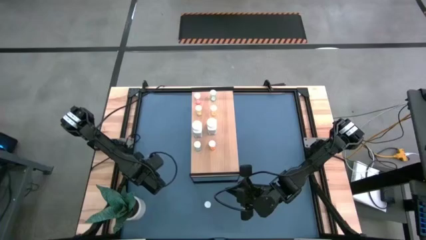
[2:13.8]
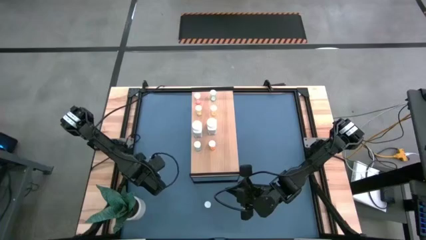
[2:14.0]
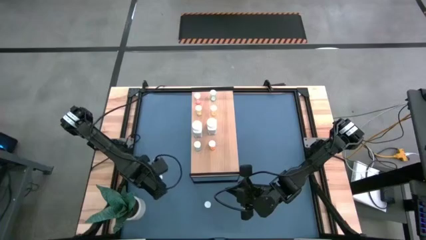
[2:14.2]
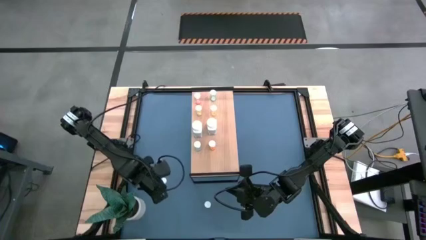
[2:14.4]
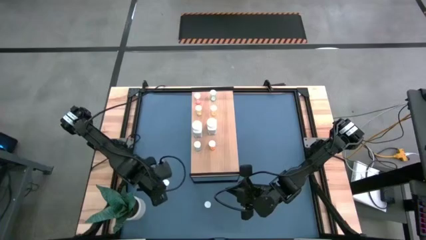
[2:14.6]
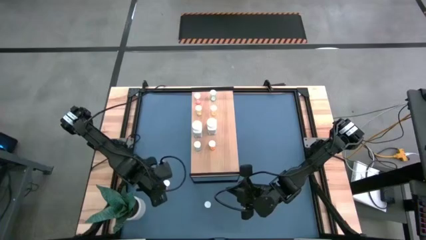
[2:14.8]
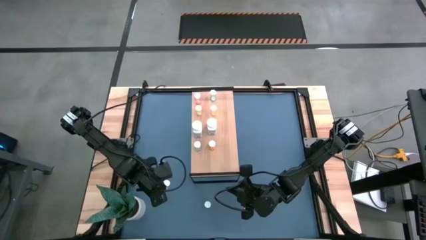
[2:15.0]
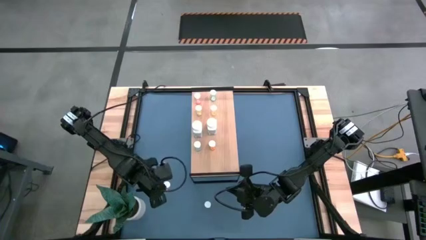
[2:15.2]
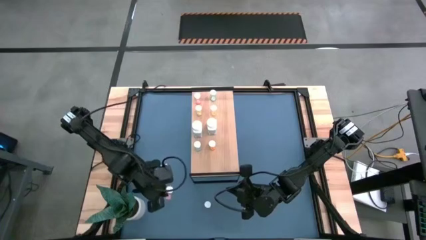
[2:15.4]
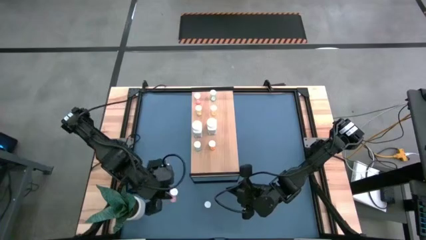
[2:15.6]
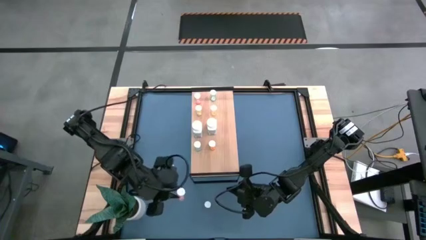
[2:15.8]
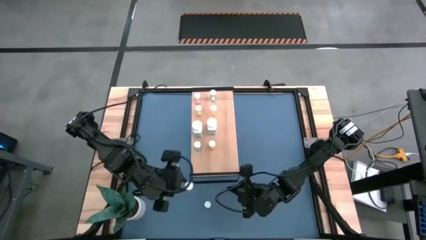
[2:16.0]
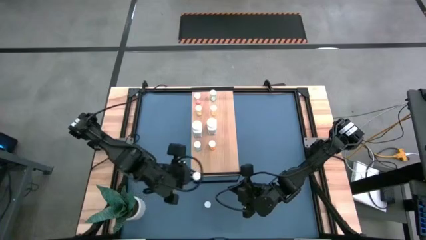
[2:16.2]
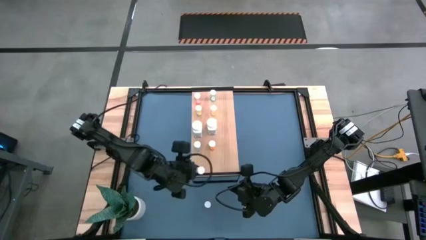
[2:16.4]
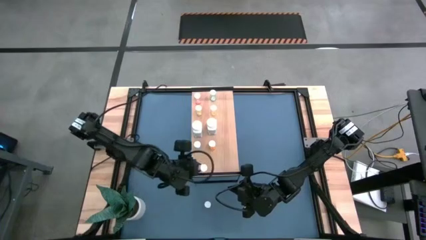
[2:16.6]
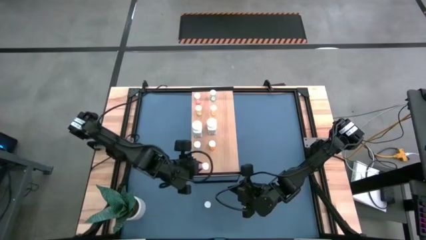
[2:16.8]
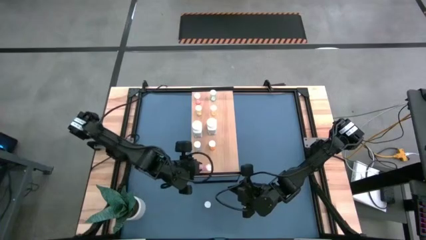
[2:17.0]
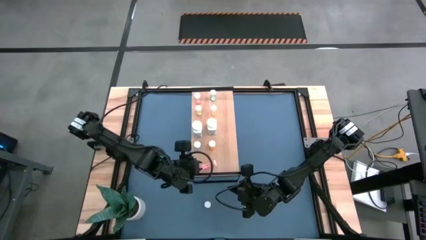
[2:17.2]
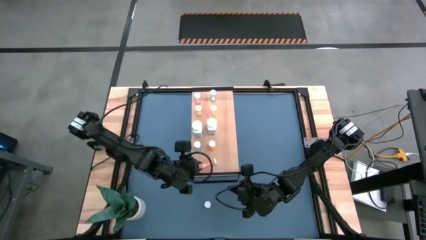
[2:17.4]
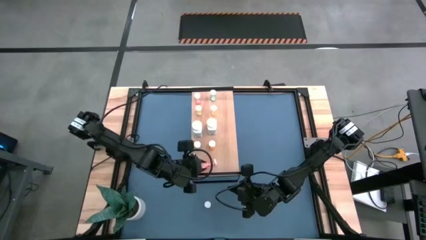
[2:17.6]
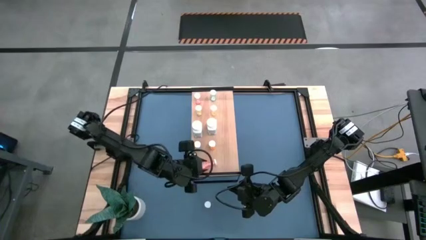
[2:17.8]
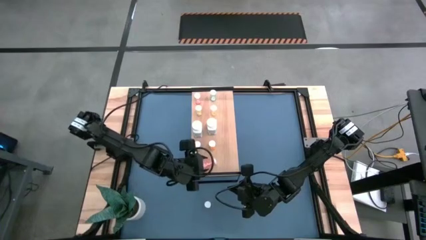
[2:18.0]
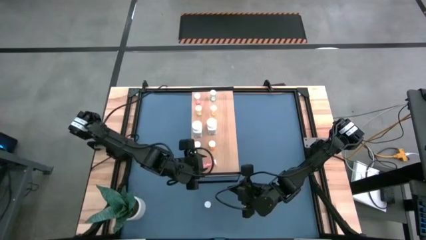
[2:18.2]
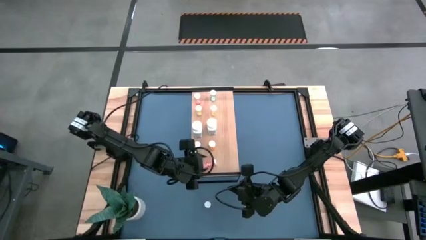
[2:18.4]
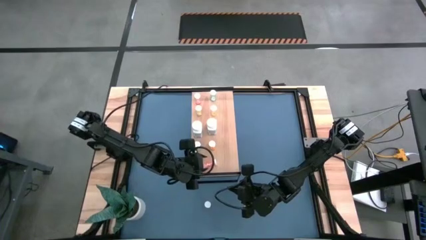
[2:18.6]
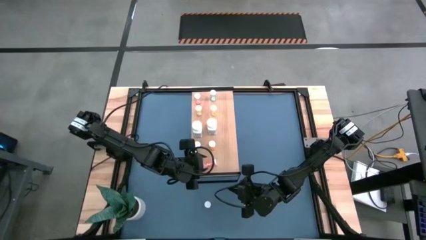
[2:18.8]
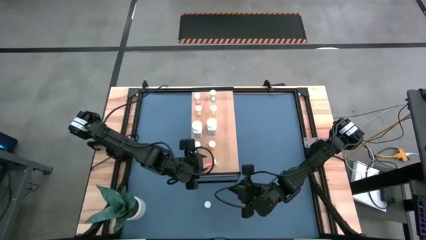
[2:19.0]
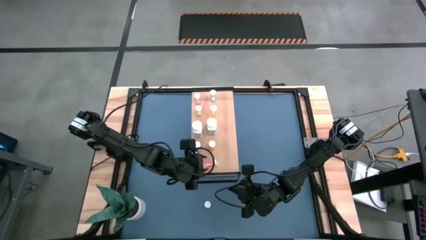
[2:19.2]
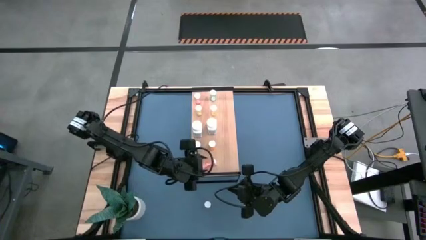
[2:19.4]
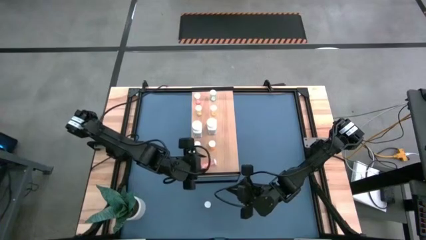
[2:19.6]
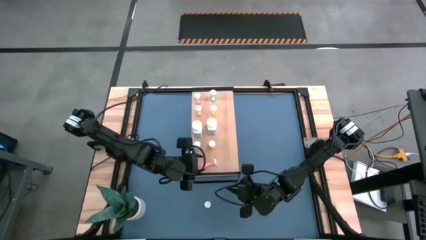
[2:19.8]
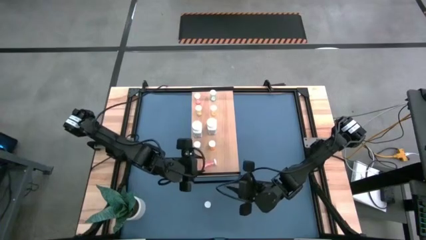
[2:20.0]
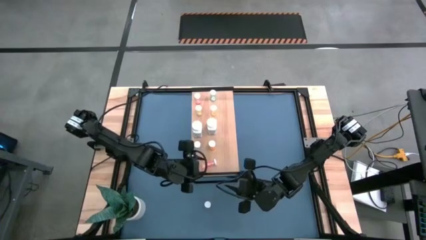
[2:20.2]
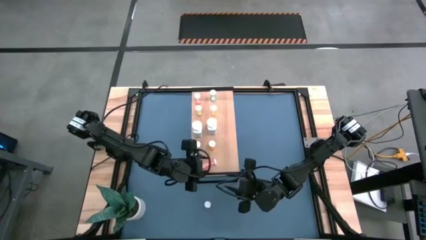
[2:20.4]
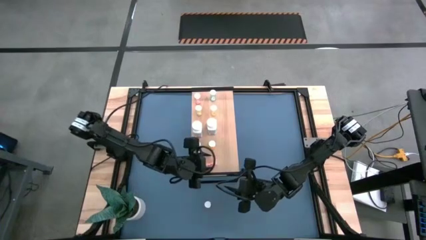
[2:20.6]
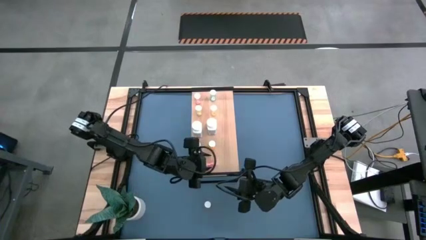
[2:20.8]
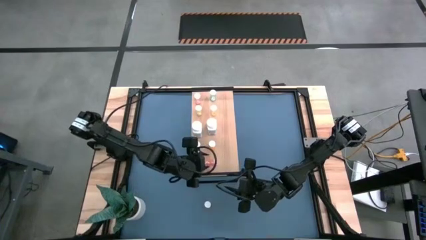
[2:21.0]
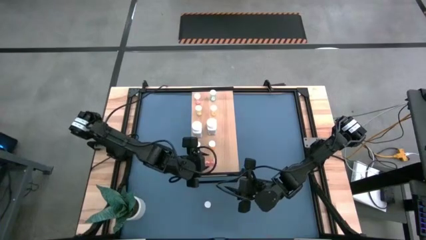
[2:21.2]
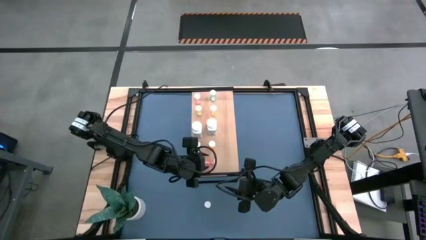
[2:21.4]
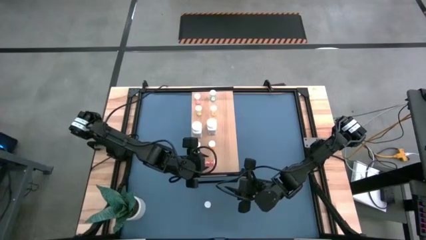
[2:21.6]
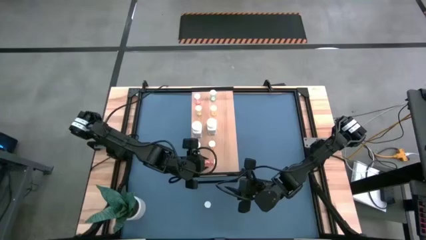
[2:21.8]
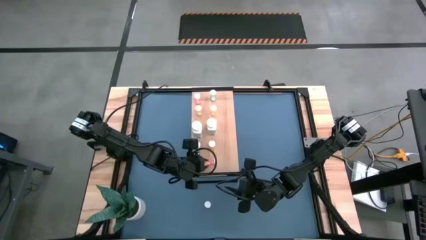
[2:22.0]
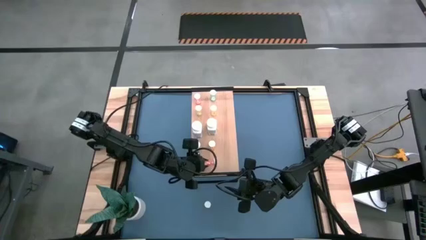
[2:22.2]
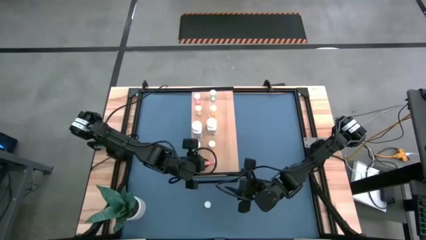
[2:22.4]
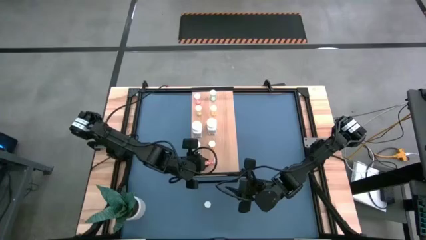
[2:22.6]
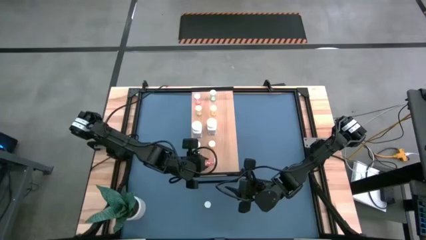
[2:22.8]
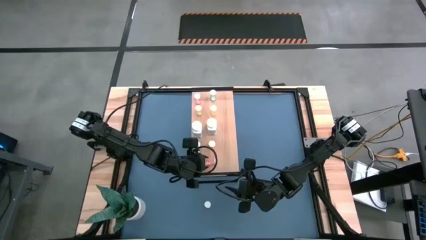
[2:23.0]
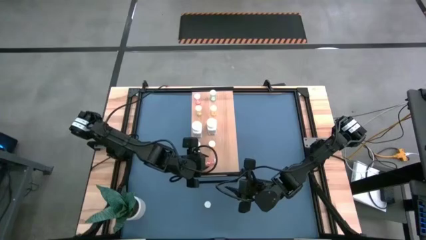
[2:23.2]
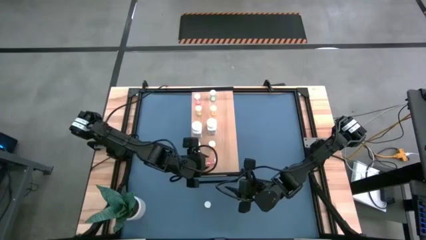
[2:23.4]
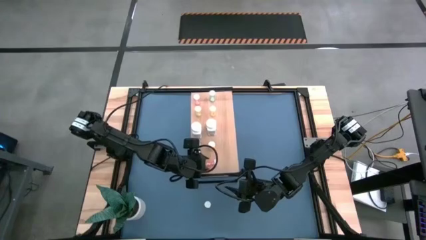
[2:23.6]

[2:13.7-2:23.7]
Task: Pick and place medicine bottles onto shelf by color
Put the pink pill bottle on the shelf

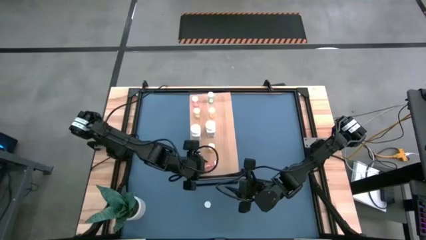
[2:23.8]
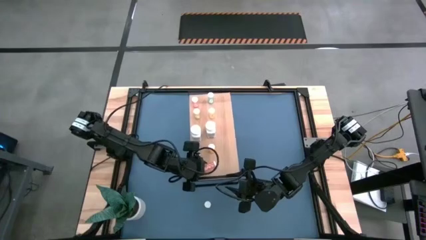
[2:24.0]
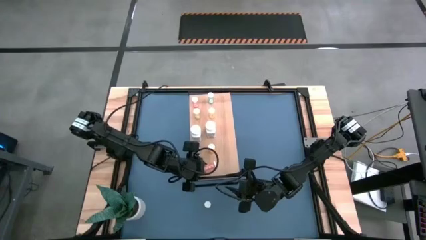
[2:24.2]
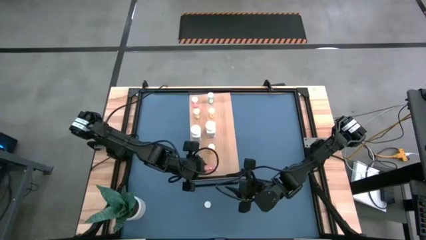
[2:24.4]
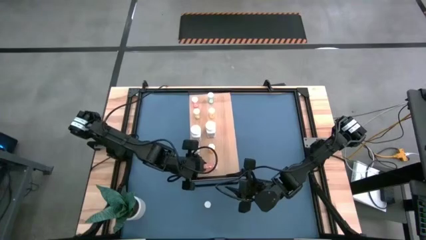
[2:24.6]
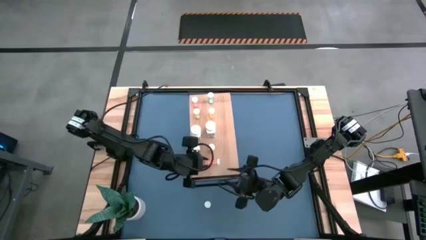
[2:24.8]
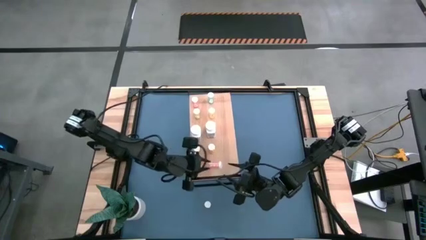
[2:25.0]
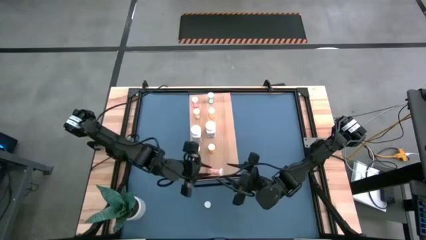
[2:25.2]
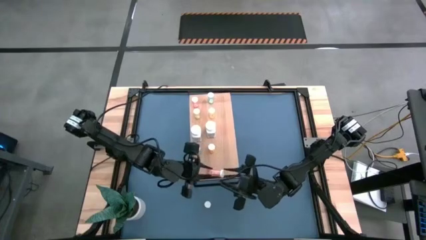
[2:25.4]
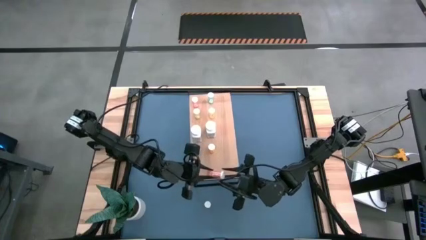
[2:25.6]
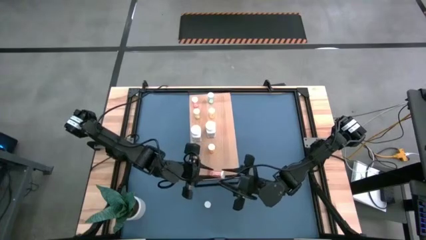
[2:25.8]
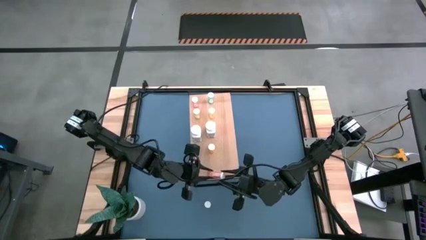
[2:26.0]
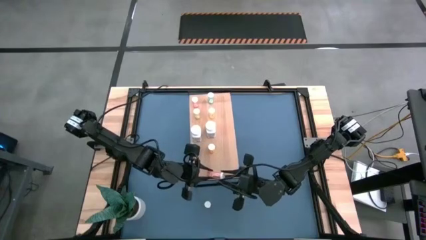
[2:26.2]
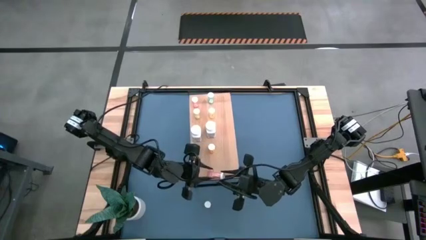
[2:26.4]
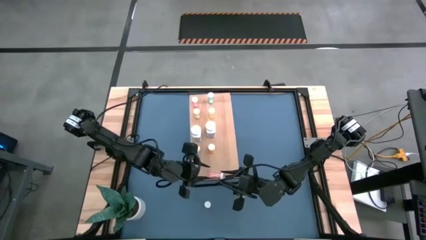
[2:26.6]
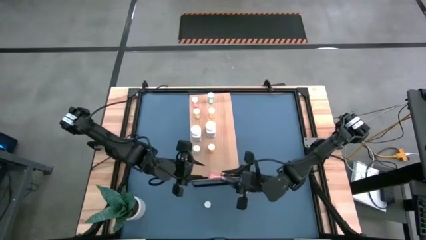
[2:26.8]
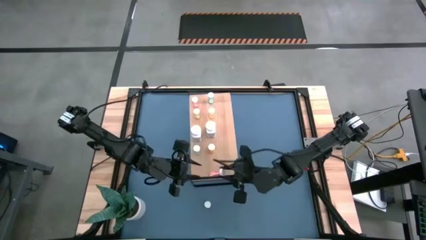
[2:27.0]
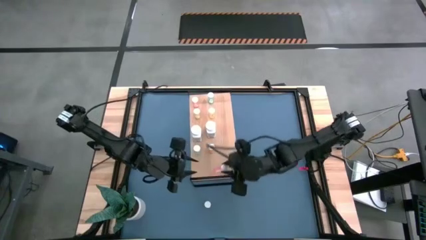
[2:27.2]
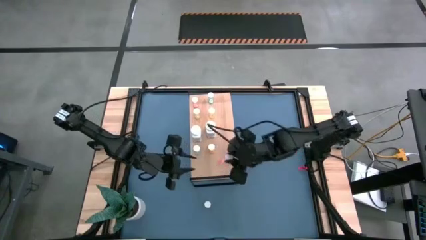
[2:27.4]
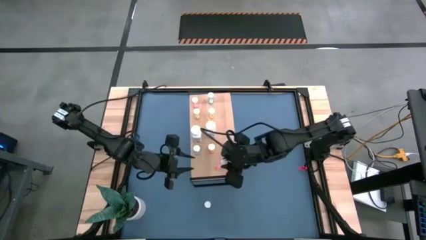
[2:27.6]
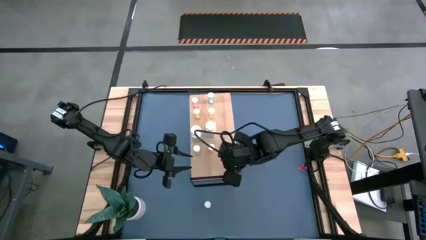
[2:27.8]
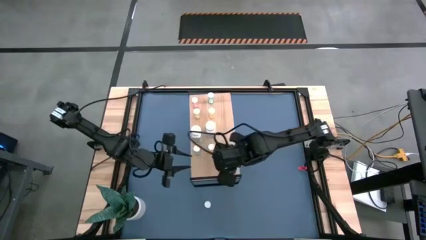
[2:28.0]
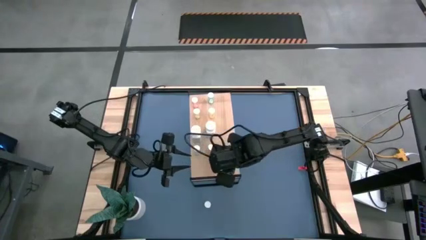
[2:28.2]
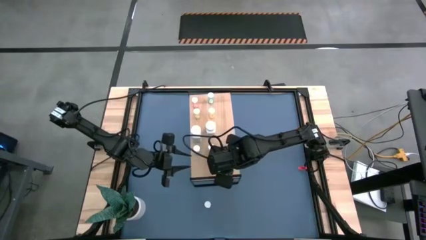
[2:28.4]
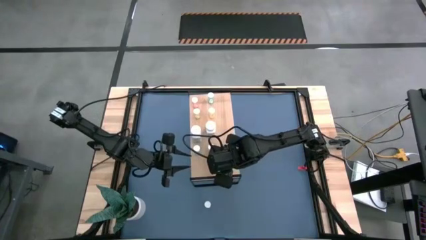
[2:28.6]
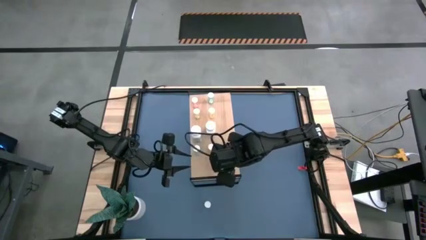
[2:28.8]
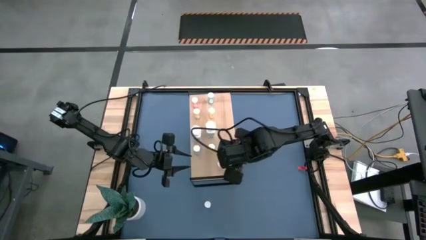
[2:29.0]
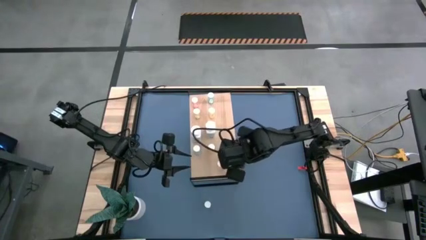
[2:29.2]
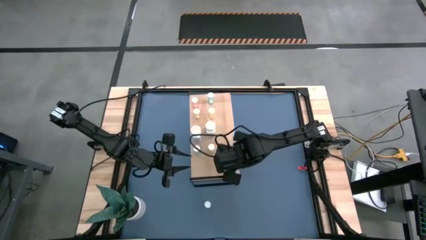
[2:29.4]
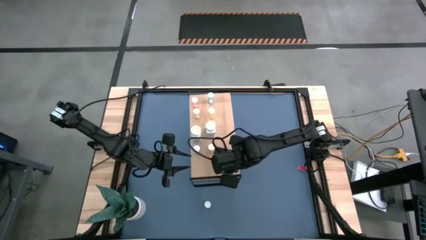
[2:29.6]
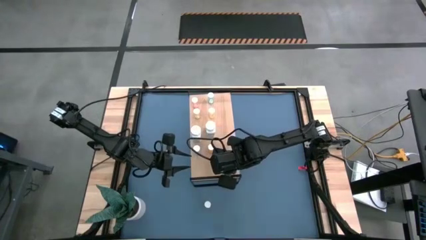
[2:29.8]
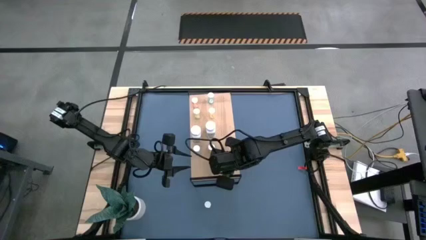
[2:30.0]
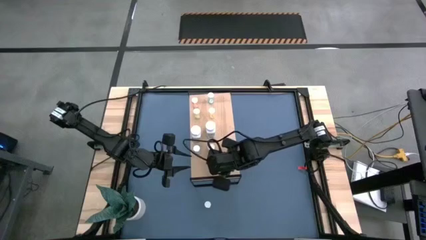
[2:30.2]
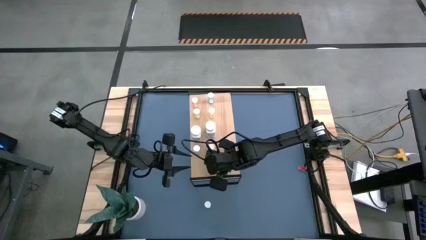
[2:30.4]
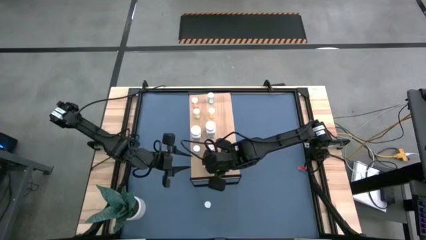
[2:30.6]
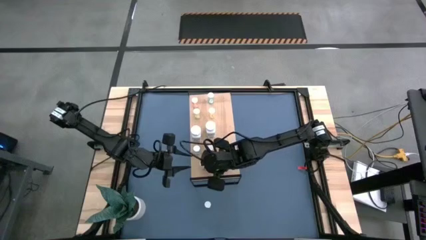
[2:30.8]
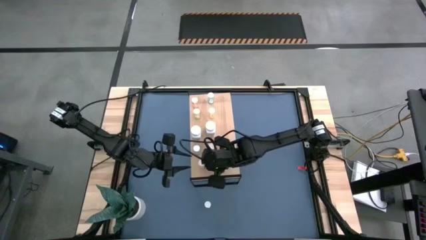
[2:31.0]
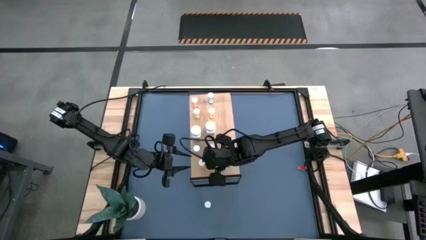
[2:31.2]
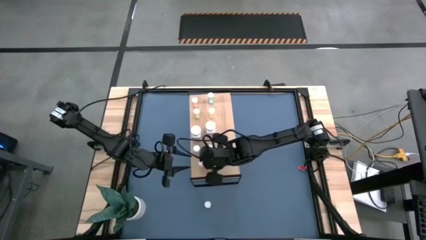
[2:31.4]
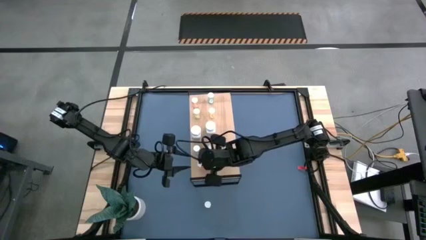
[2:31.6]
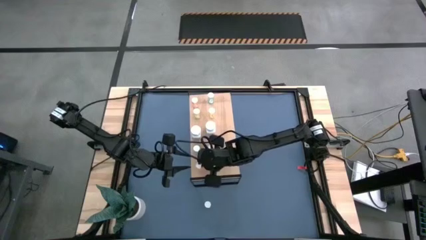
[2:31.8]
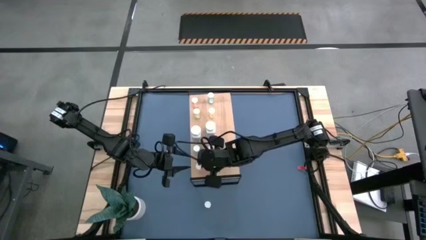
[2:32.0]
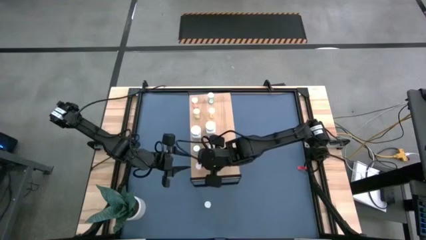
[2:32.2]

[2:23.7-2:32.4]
Put the pink pill bottle on the shelf
